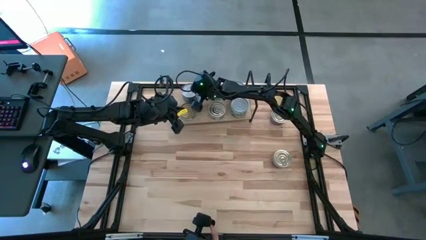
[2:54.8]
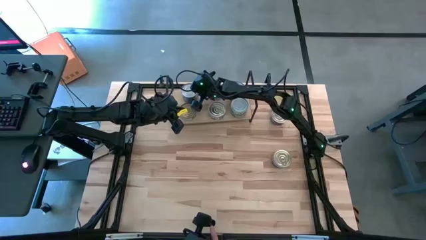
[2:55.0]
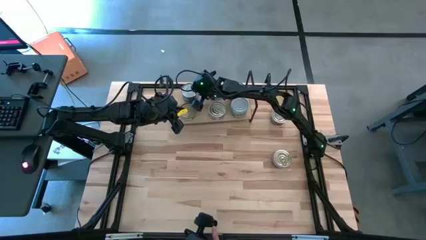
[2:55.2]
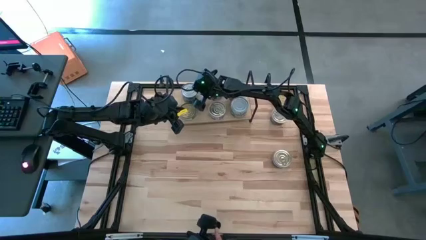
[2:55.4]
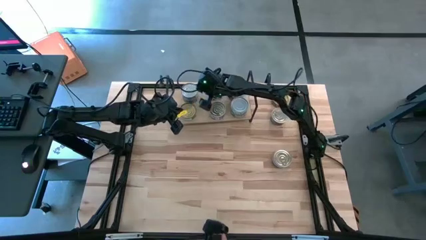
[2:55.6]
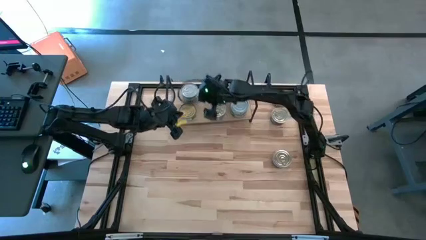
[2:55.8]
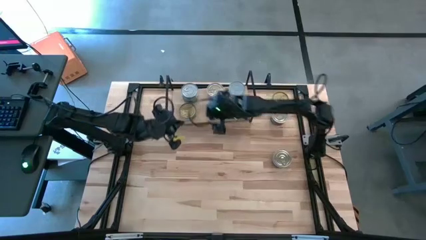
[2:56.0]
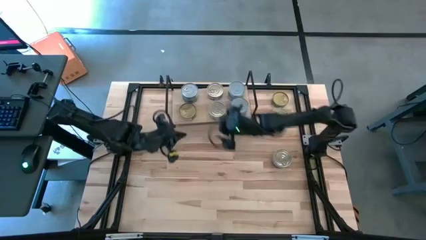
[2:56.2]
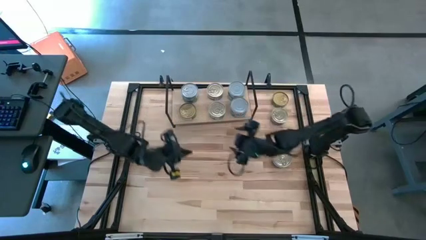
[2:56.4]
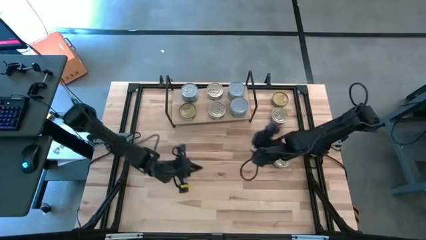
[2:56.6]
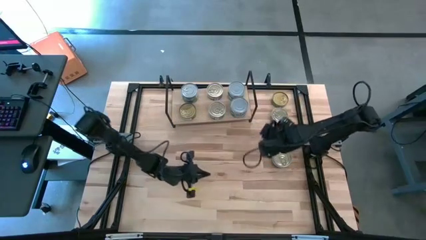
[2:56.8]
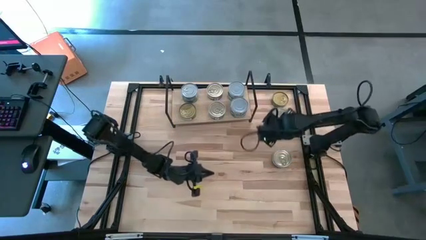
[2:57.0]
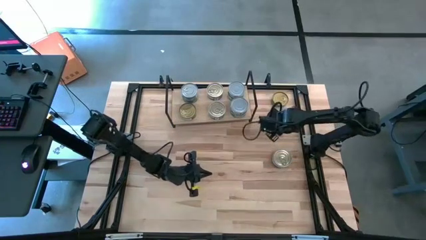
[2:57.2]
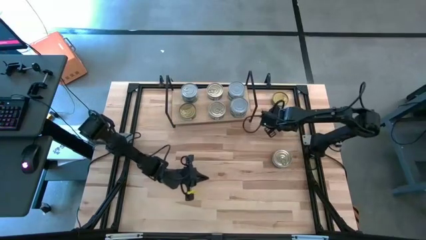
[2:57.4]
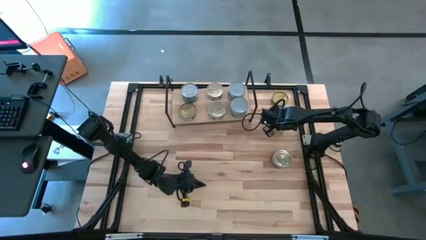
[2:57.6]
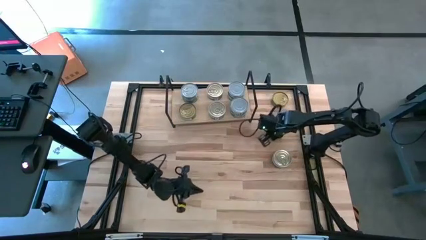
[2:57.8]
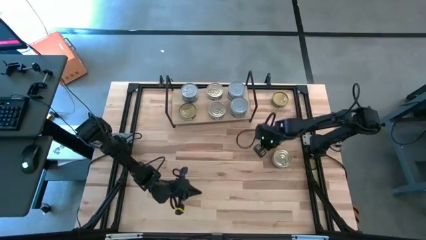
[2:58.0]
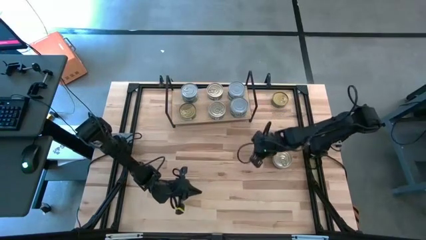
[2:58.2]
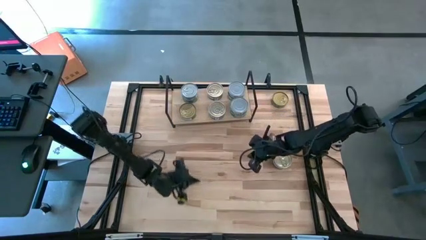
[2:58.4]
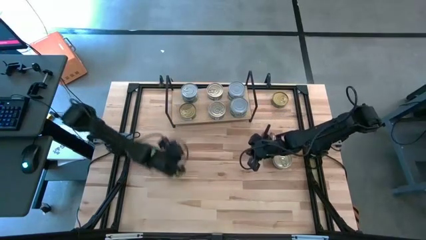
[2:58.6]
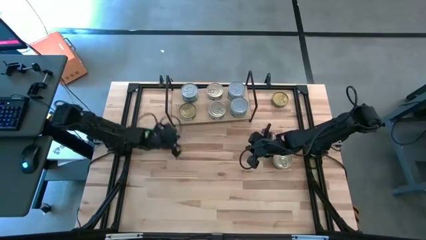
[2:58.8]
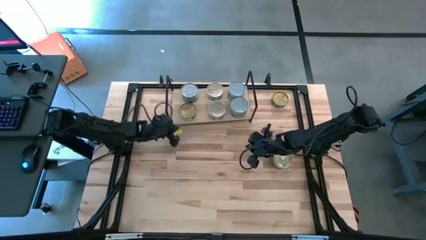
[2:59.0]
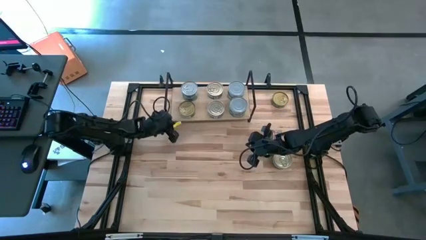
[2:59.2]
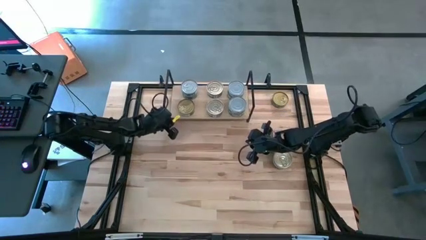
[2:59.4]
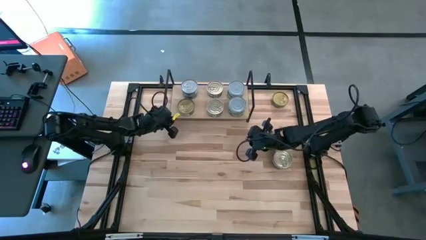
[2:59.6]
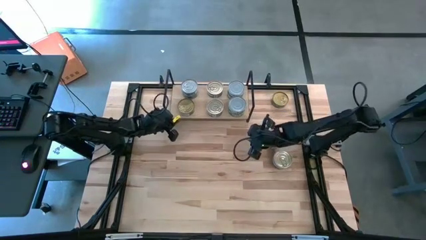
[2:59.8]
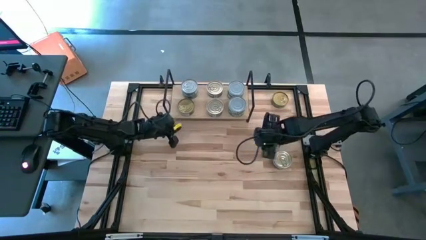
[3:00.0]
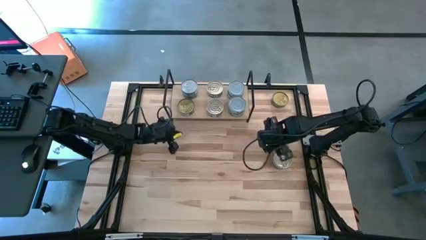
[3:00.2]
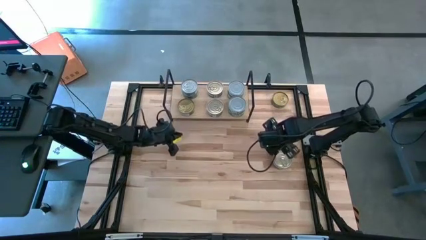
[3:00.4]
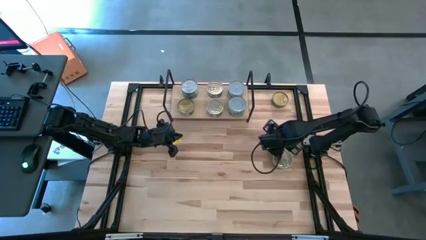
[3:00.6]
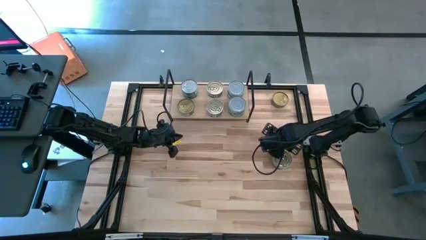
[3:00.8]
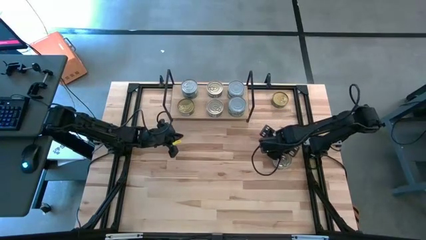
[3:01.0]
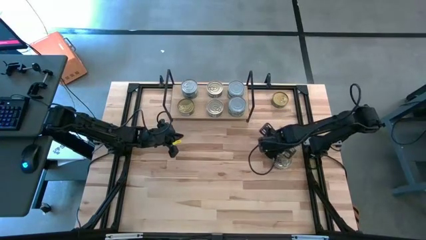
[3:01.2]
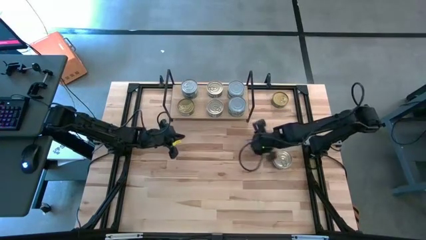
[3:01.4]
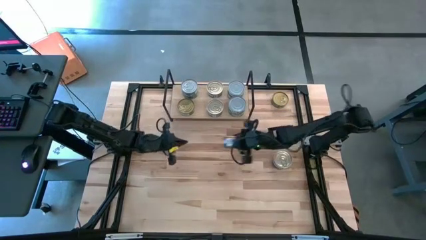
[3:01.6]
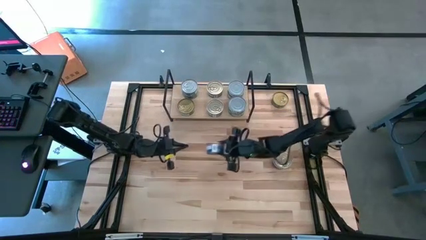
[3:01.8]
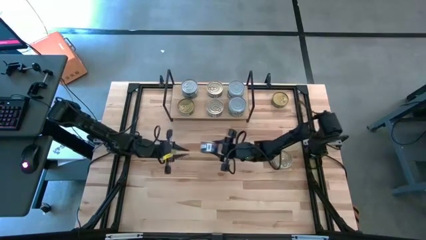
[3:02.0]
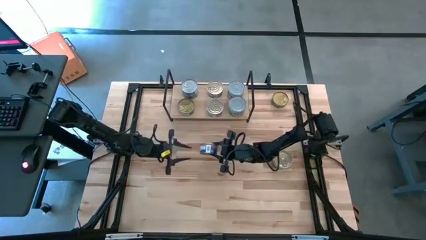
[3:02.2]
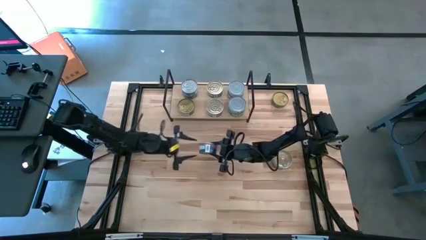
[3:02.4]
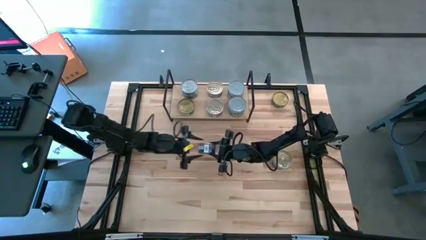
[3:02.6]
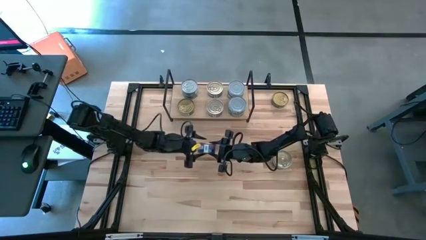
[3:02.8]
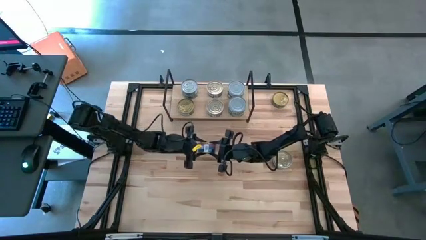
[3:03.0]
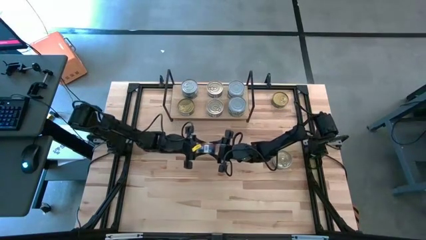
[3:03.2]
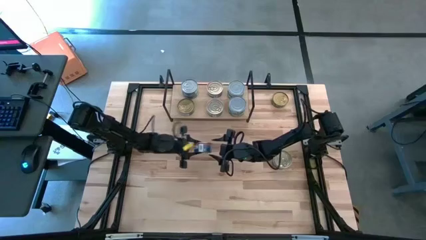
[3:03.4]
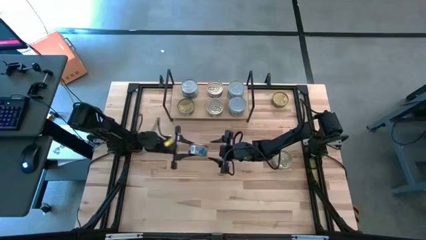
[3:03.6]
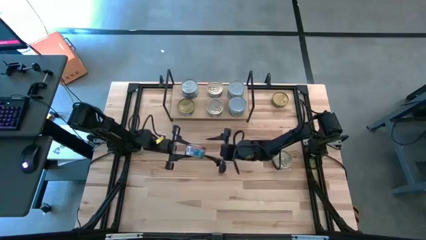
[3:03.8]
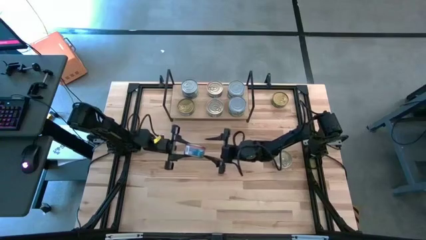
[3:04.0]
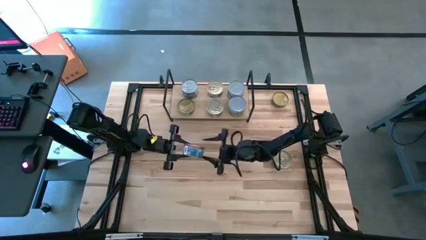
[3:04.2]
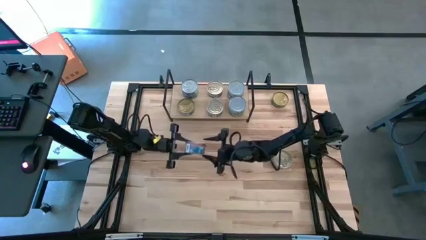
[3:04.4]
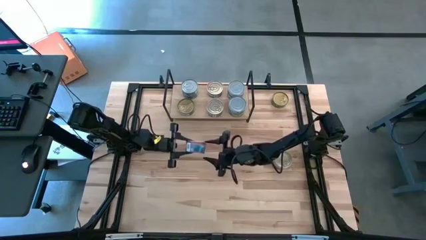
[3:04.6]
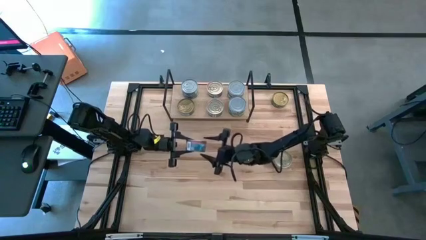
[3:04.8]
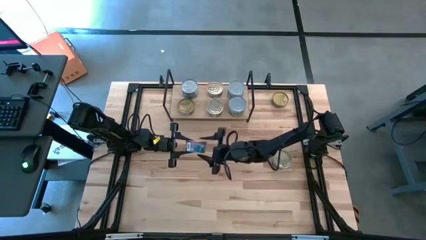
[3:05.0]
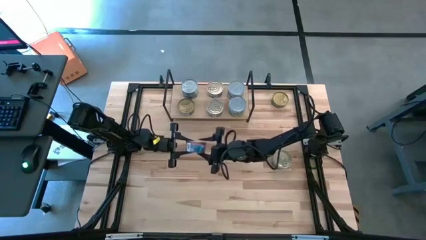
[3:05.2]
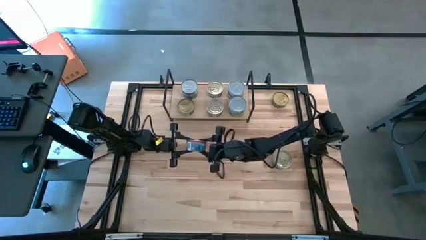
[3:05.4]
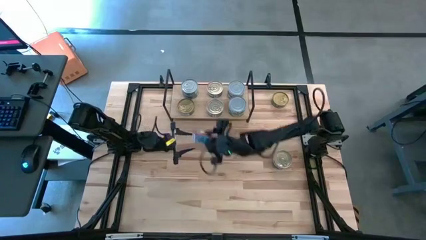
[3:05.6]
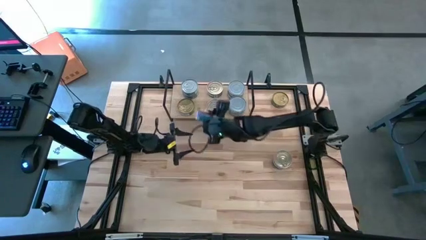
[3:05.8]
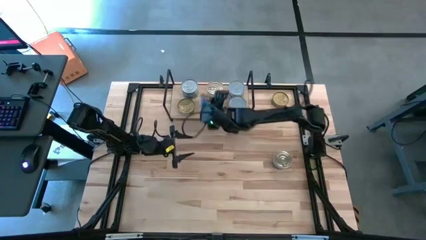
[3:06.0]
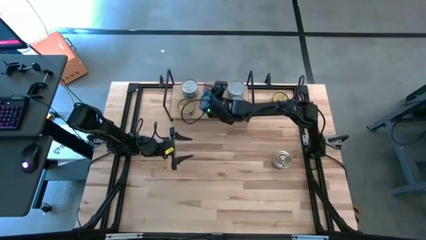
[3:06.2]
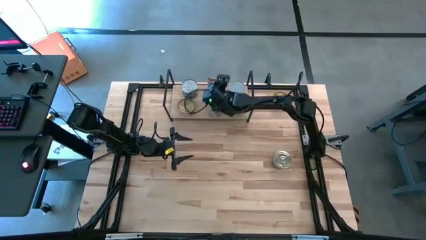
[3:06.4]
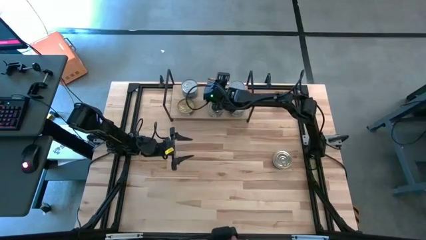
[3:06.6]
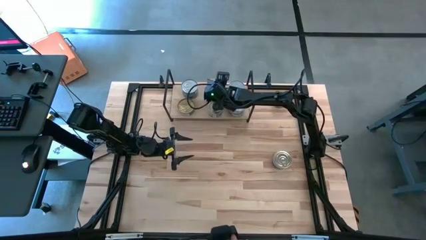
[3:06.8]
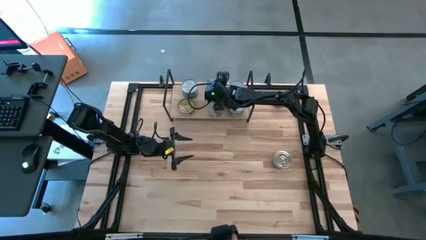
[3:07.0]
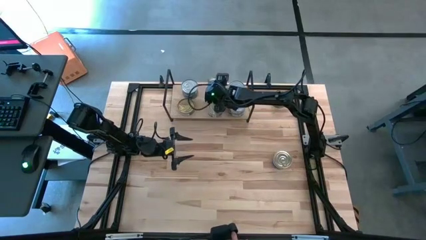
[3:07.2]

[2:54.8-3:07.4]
Task: Stack canned seafood by type on shelf
Stack the blue-pink tuna can on top of the blue-pink tuna can on the shelf
